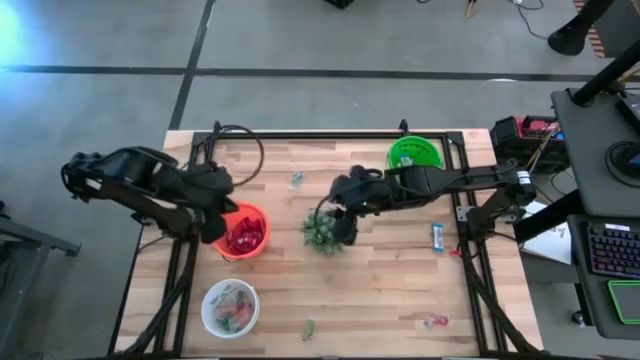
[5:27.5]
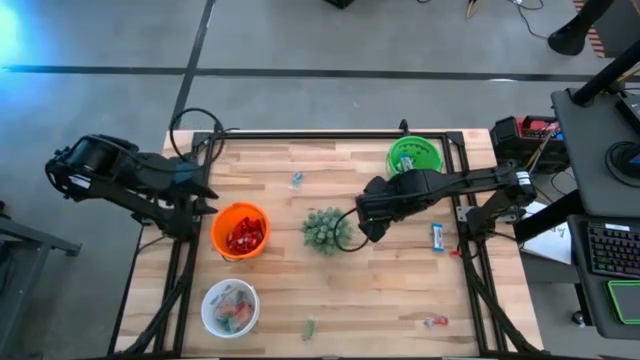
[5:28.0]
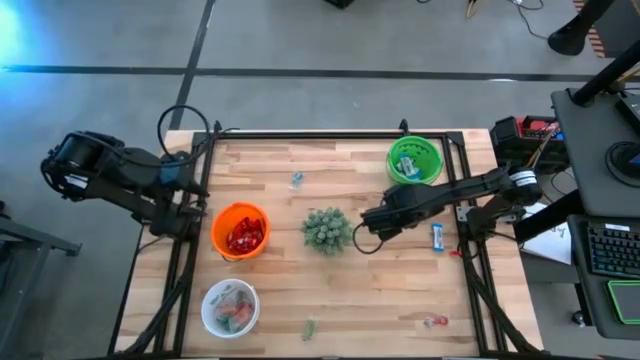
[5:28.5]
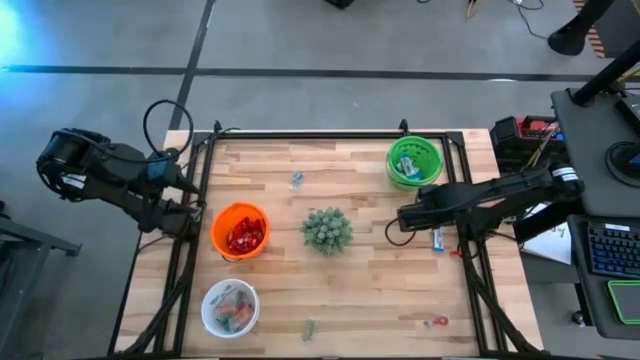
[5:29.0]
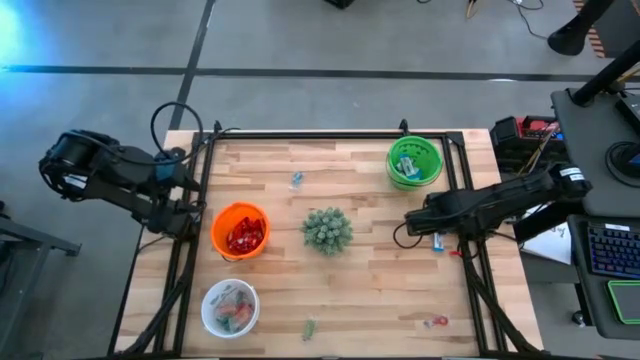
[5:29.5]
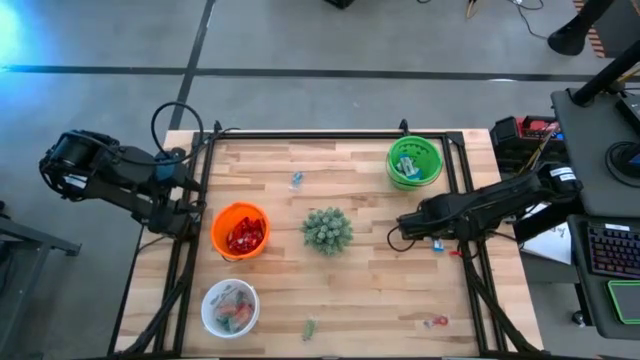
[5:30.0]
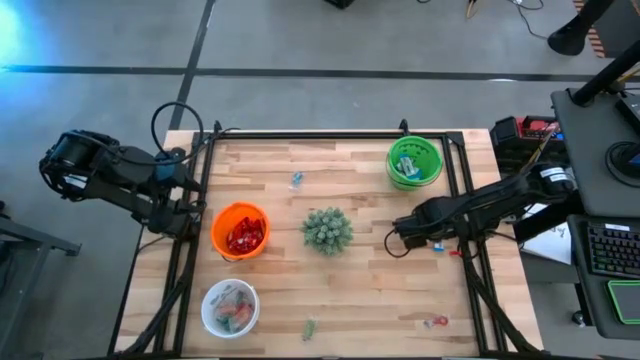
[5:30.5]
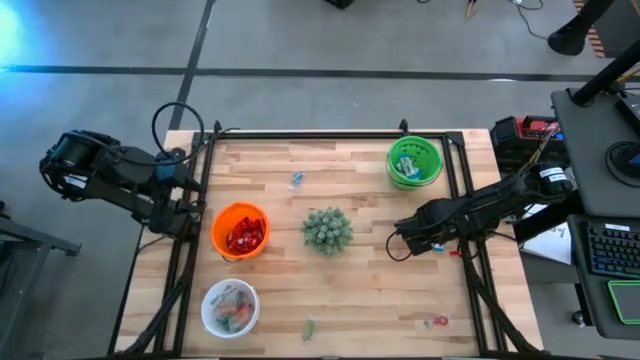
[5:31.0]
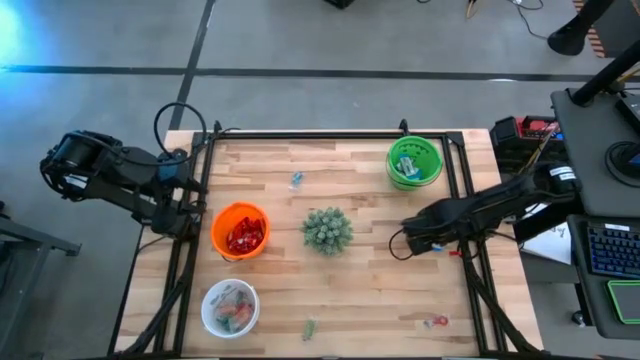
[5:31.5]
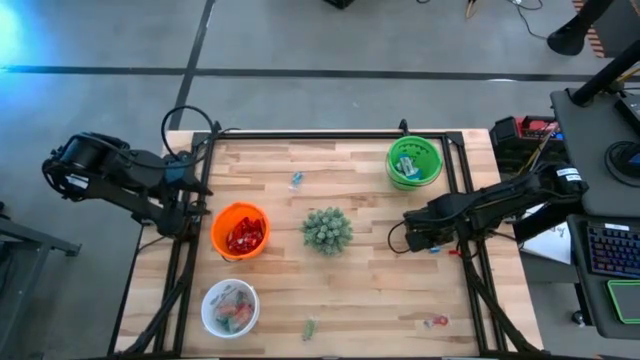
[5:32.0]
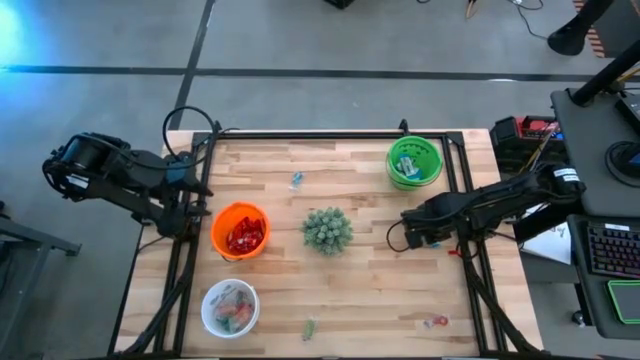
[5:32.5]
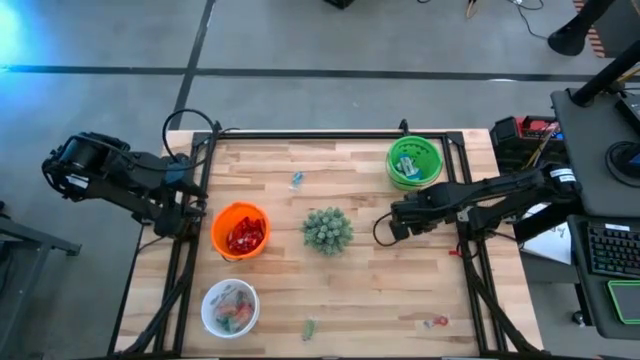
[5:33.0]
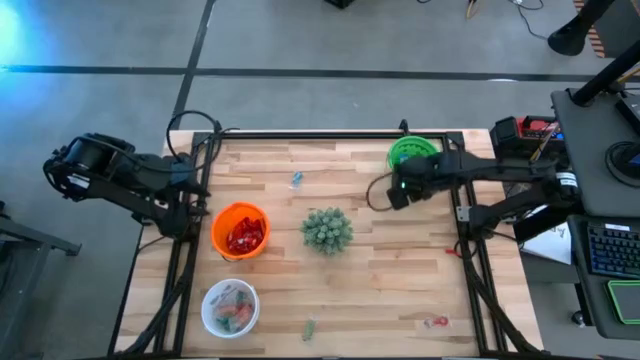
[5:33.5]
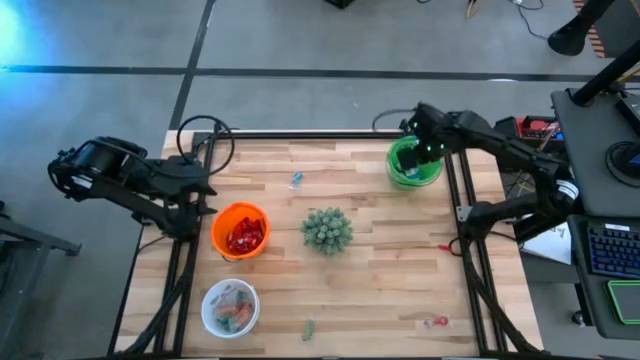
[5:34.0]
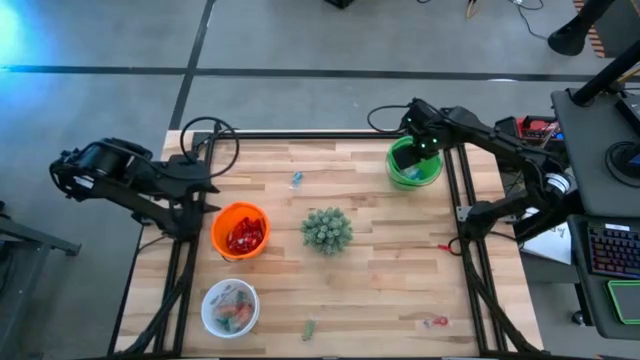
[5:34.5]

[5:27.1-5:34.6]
Task: Sort candy
Put the white chocolate into the green bucket

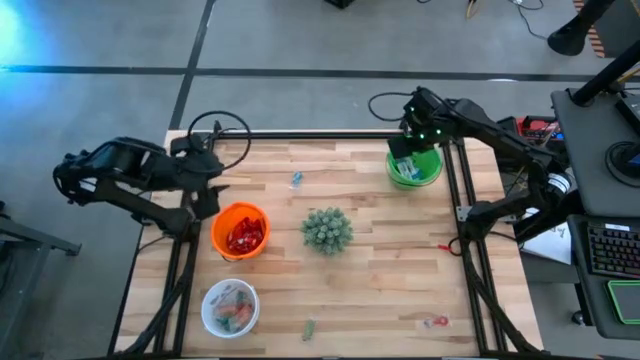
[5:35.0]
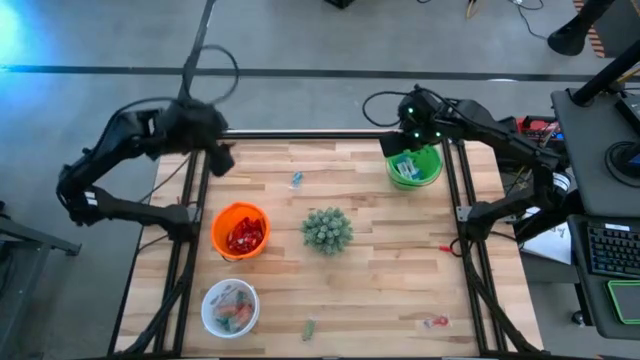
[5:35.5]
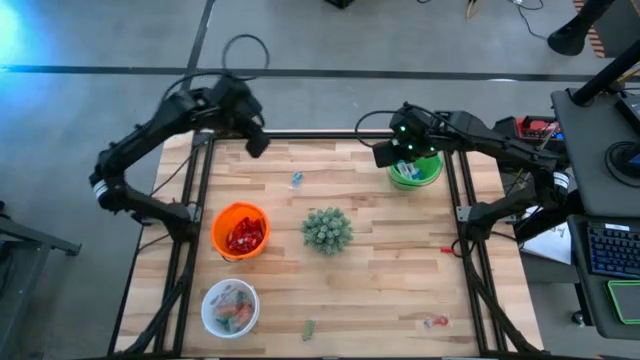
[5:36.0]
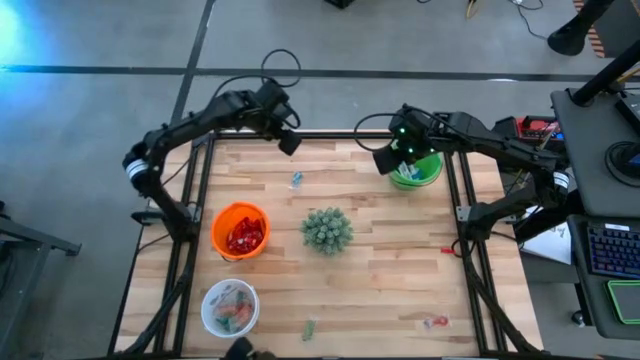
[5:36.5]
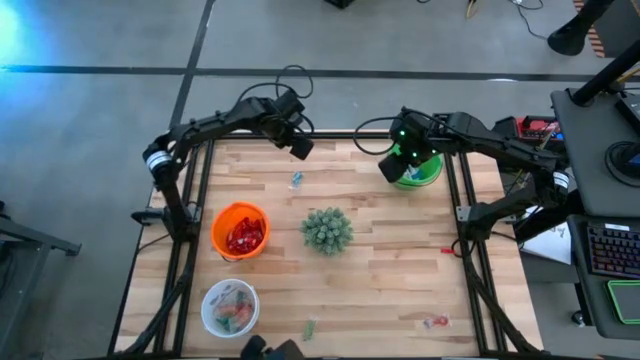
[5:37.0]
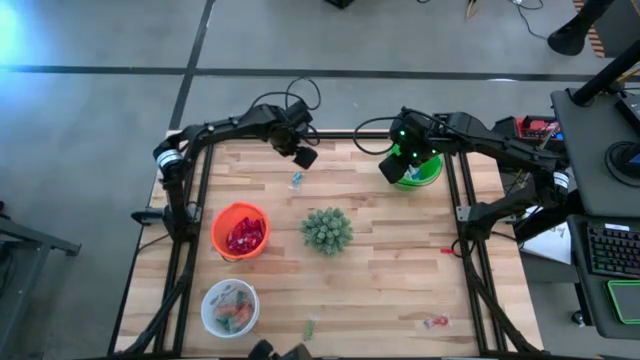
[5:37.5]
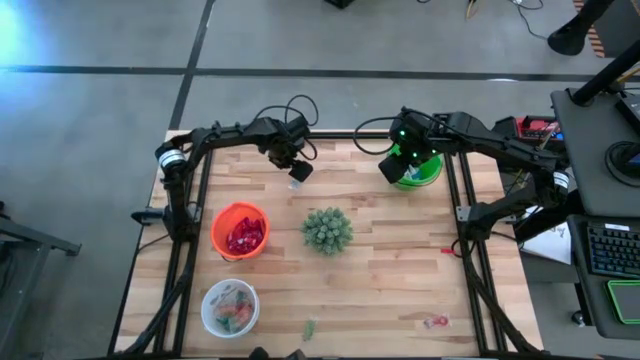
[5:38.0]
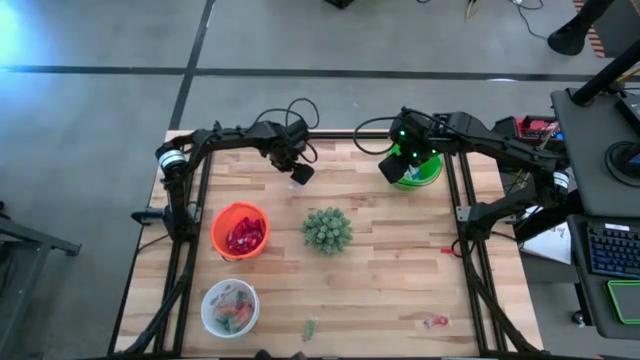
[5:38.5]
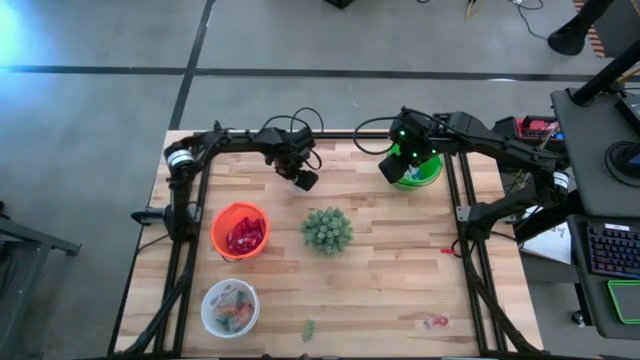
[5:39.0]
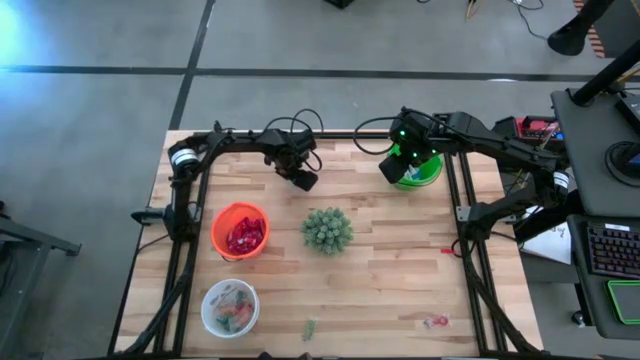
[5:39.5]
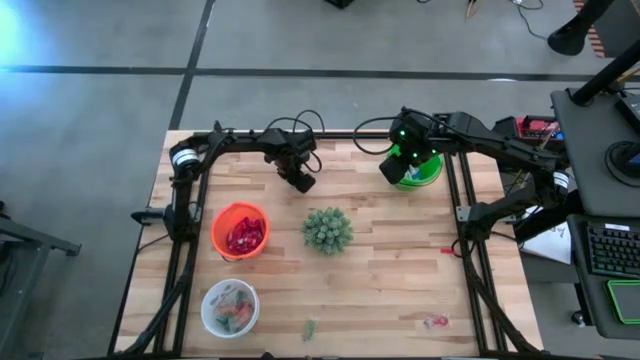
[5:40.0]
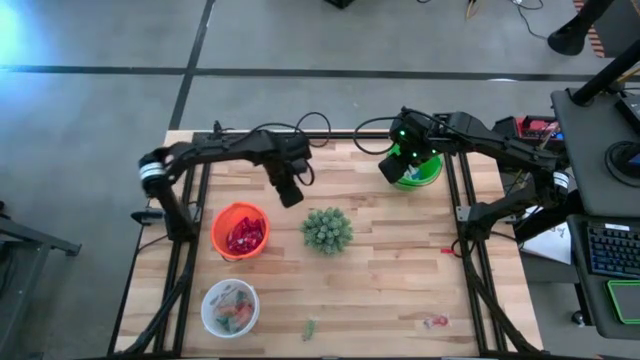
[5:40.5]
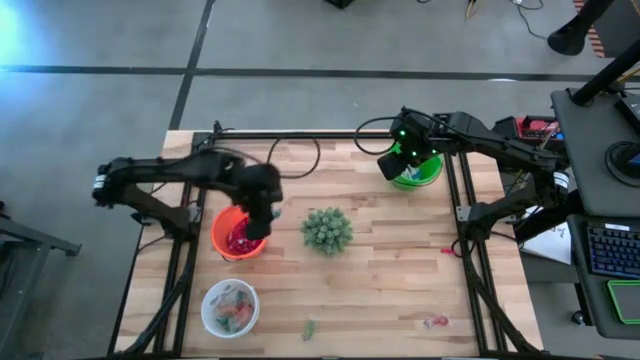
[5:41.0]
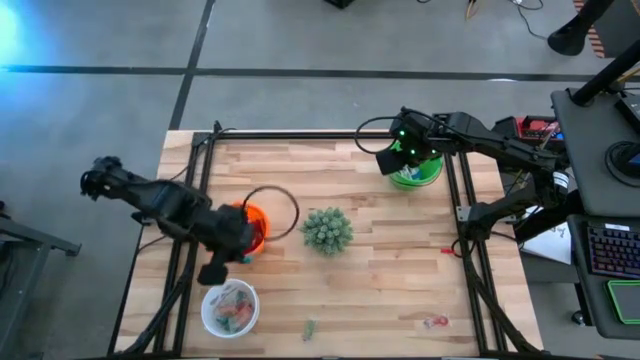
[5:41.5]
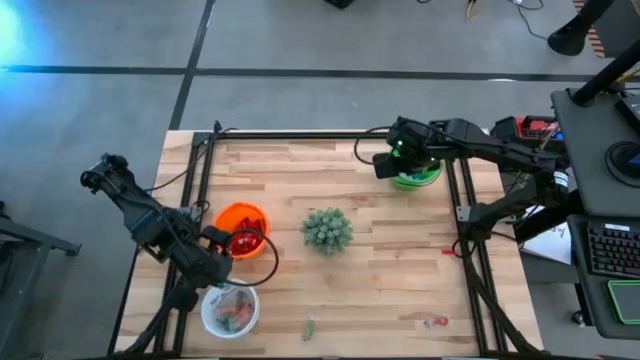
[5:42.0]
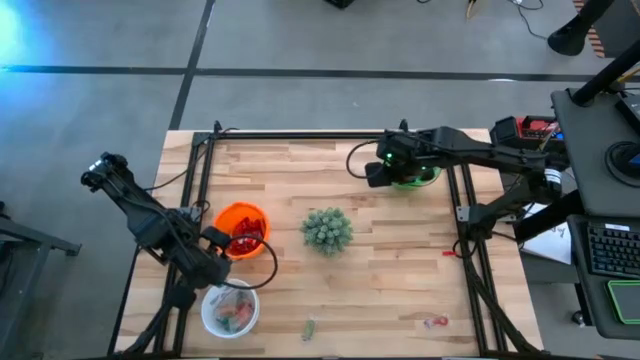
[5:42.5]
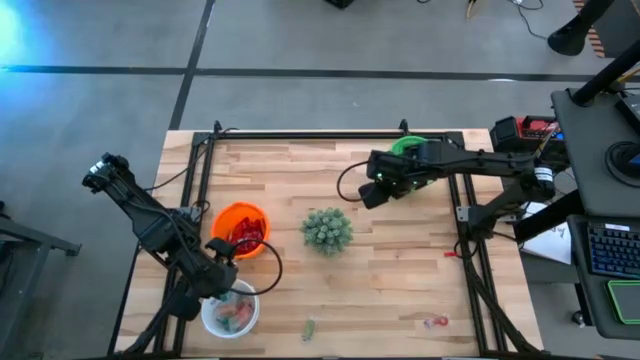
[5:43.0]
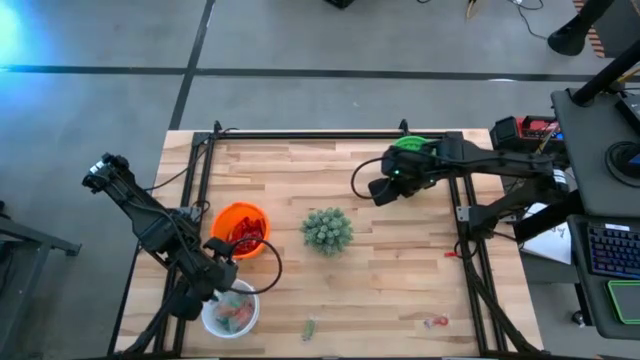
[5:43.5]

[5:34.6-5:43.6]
Put the blue gummy into the white bucket

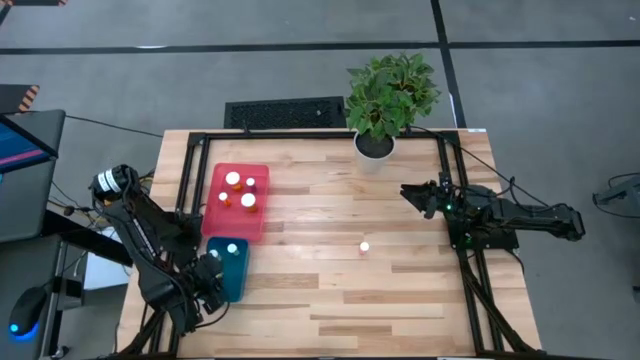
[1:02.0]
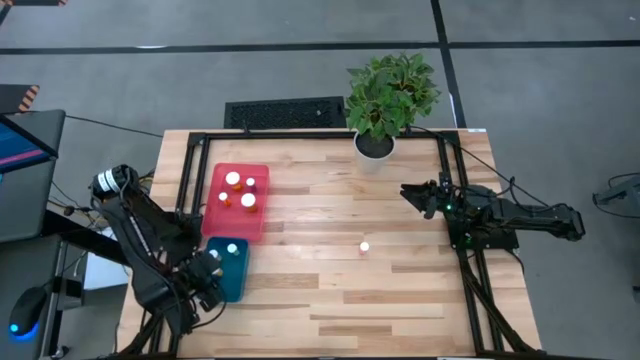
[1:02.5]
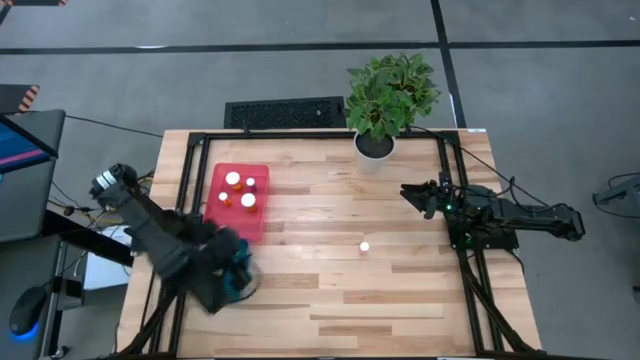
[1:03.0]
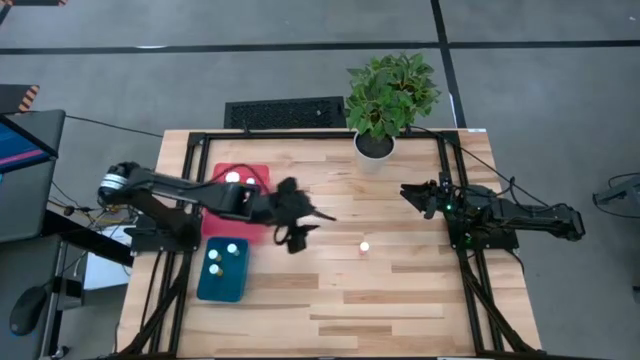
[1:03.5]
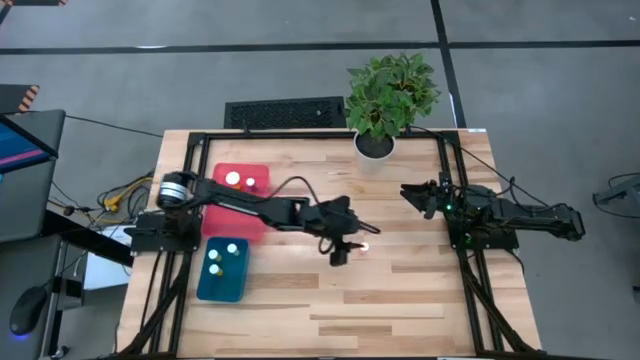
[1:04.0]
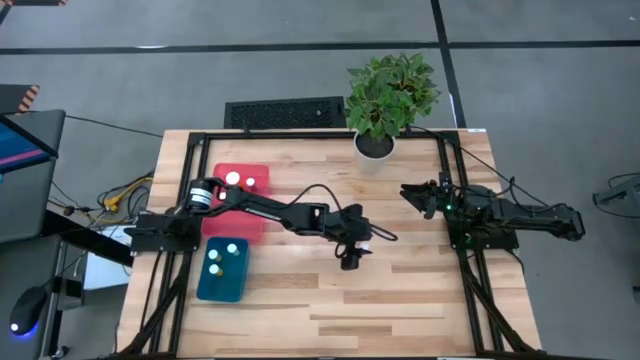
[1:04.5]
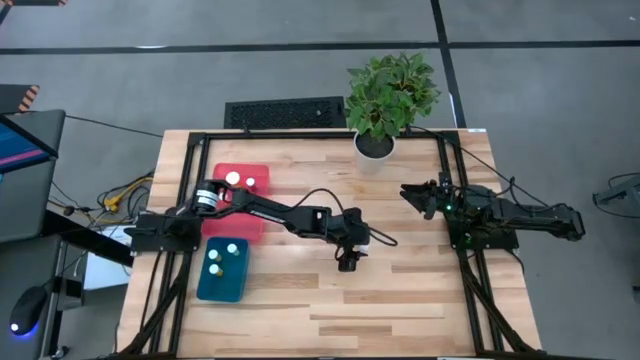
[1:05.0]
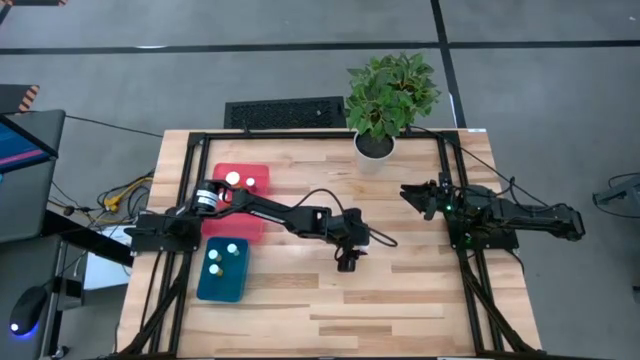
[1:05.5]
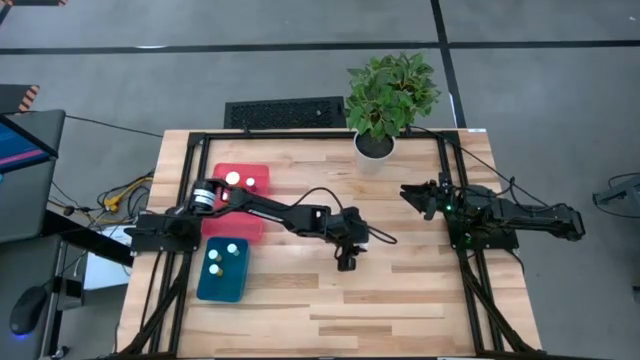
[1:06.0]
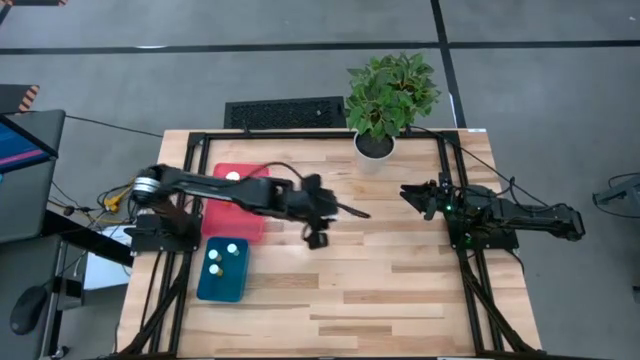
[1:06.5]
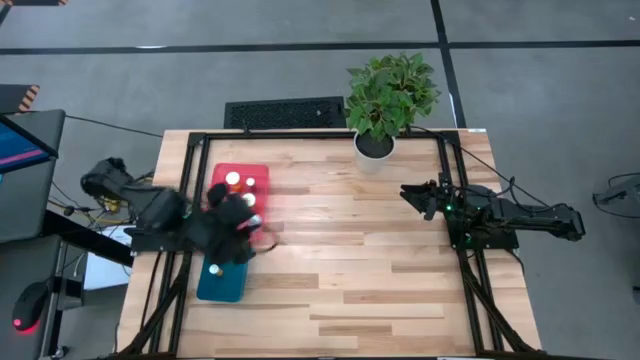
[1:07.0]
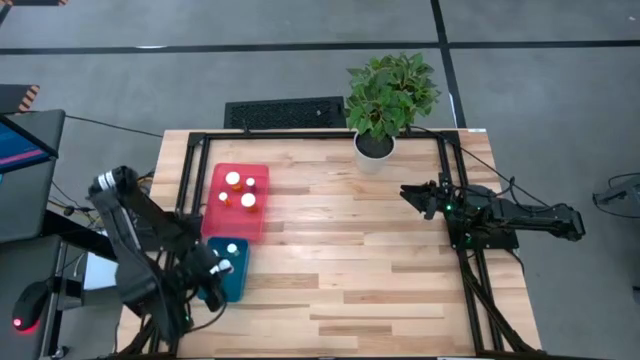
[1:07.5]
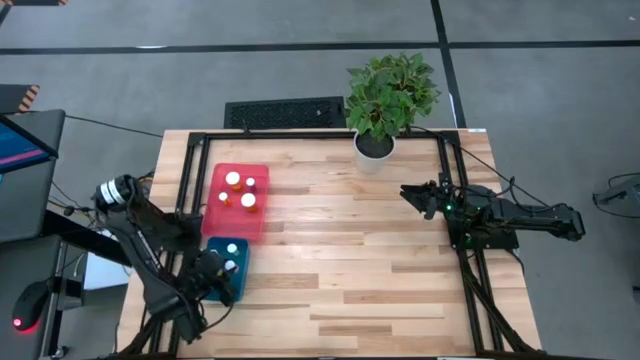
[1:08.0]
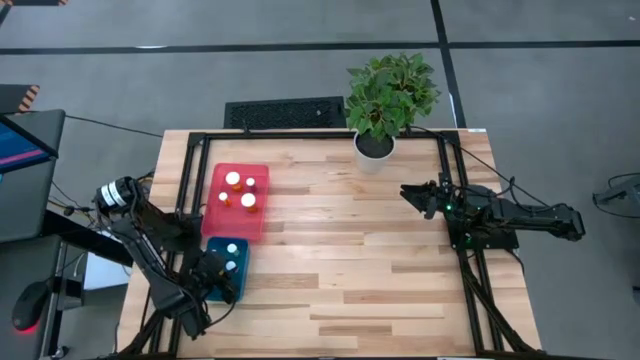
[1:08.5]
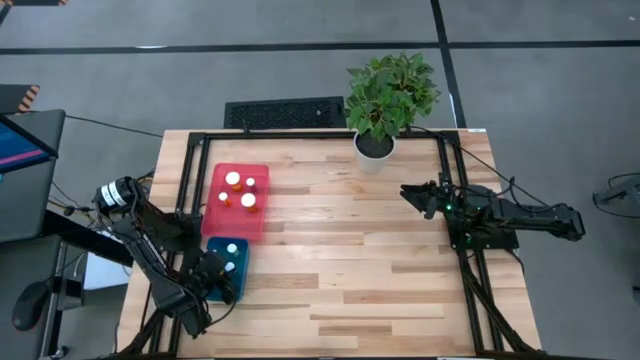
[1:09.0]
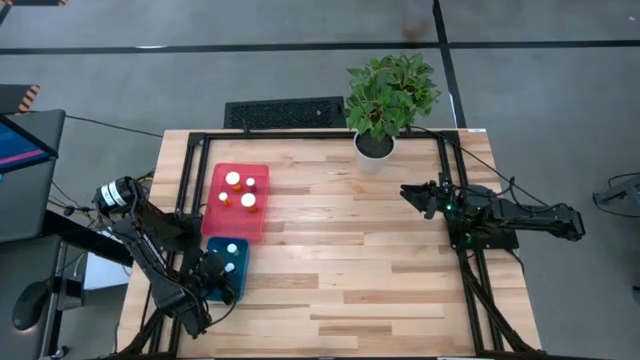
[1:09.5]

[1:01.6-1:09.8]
Task: Pick and place medicine bottles into bin by pill shape (circle, oval)
Put the pink tablet bottle into the blue bin
